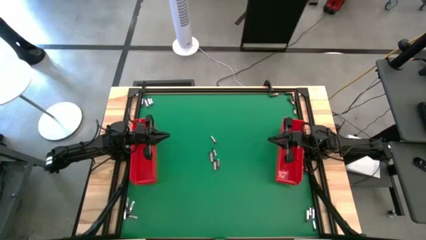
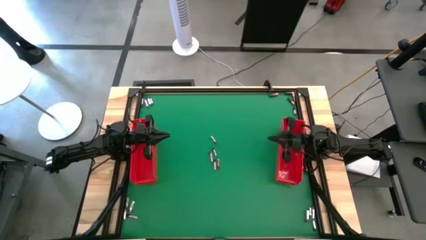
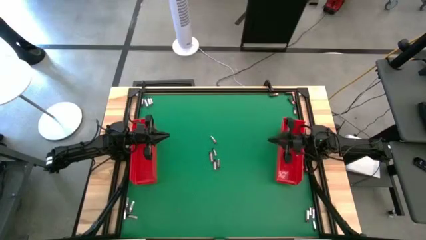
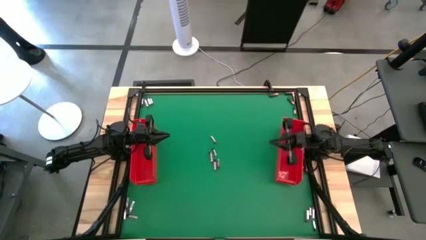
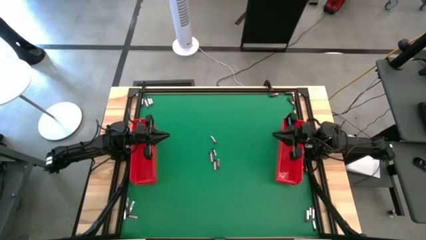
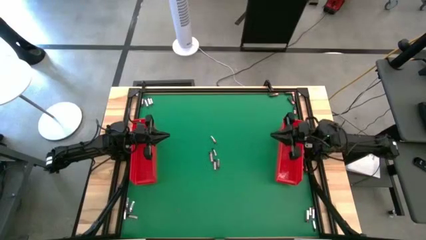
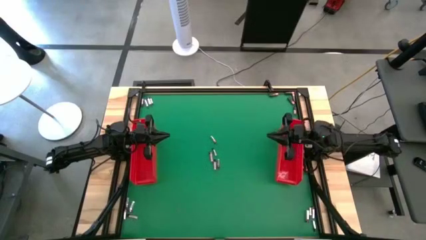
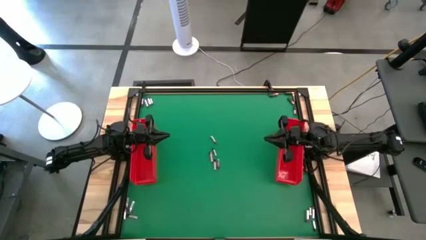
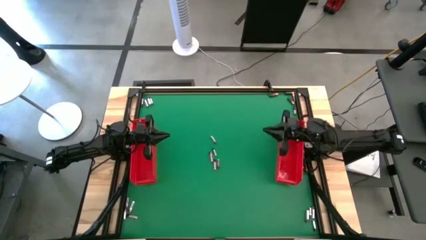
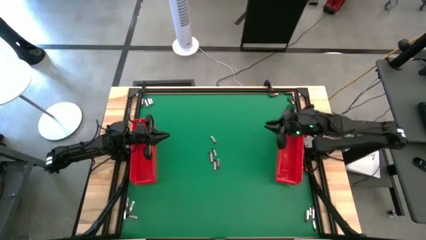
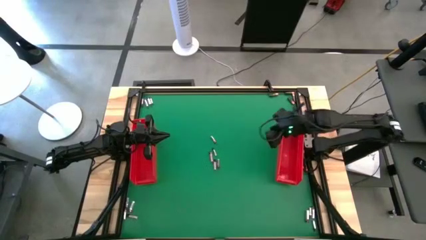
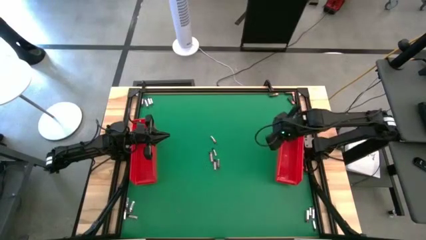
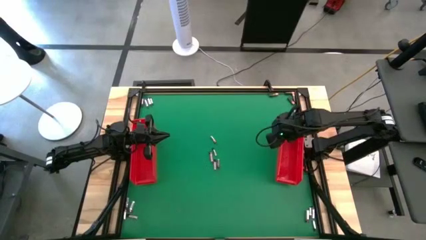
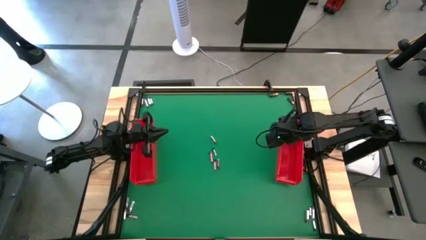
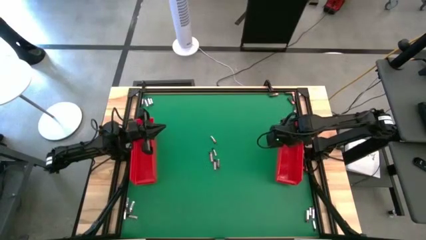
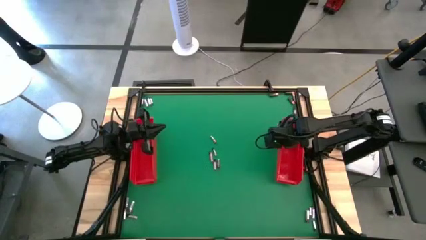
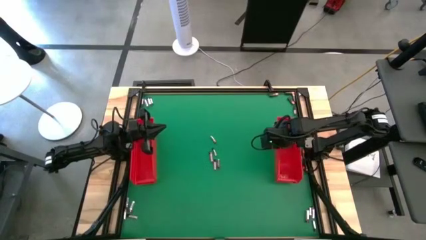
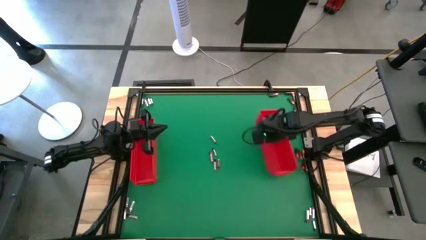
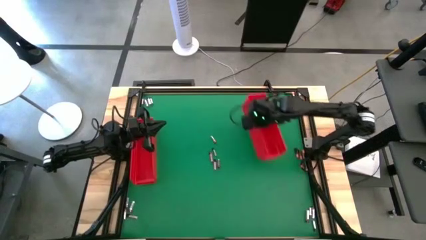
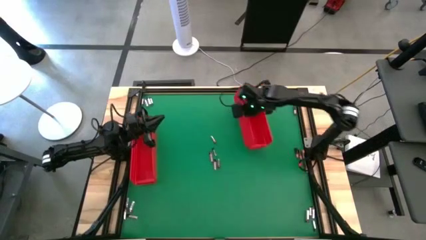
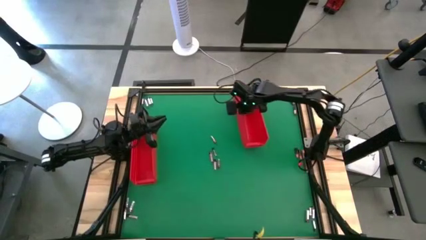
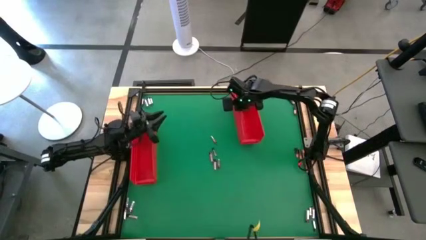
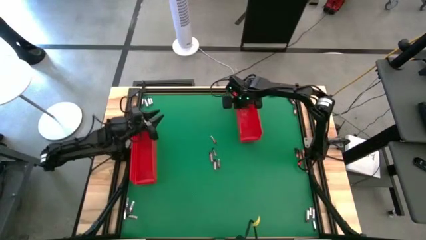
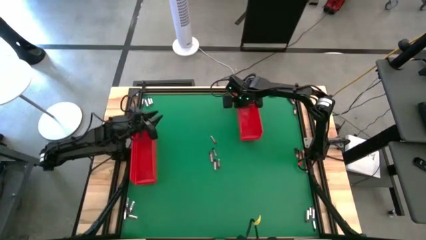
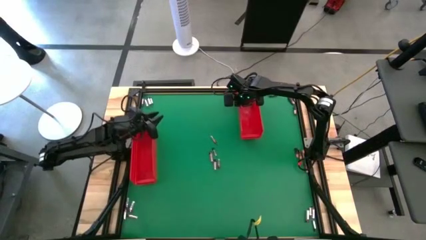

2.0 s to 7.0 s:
Task: Sort batteries
Move the right red bin to the top right of the table

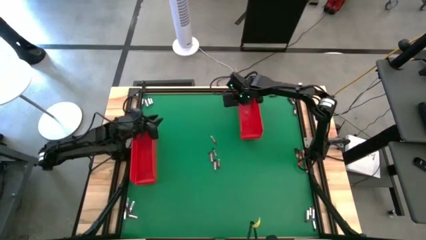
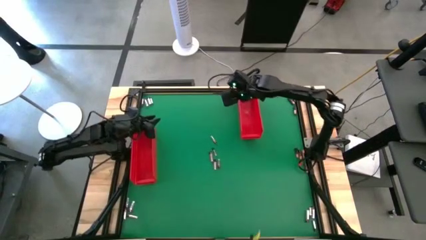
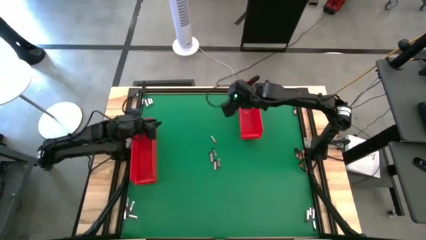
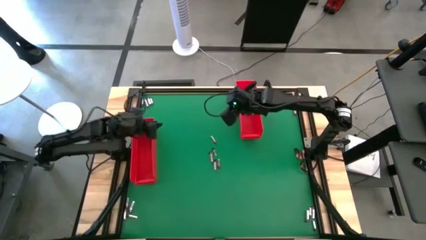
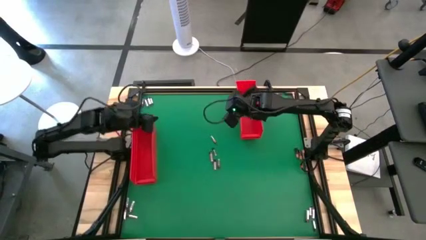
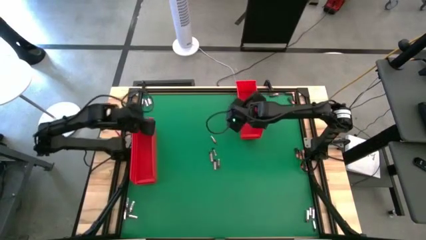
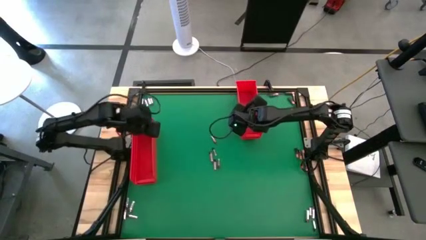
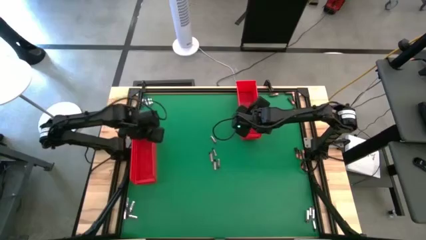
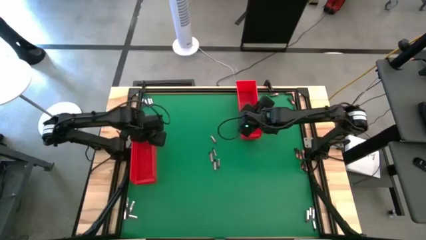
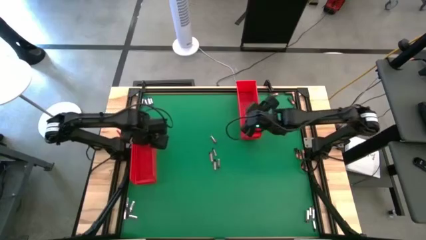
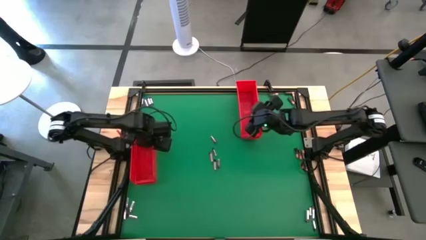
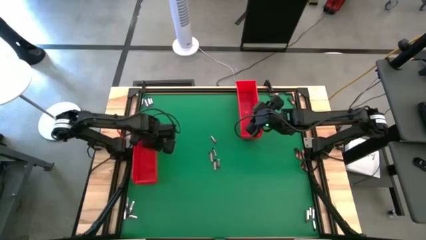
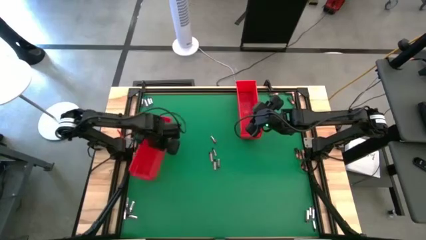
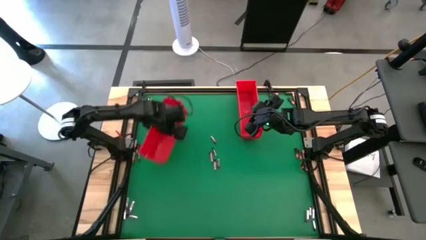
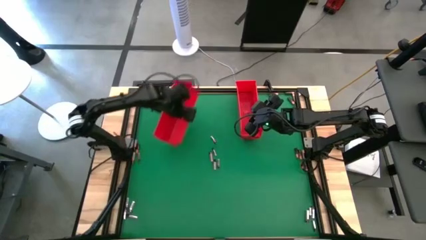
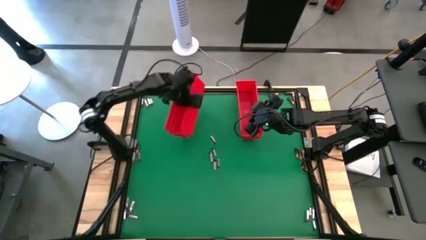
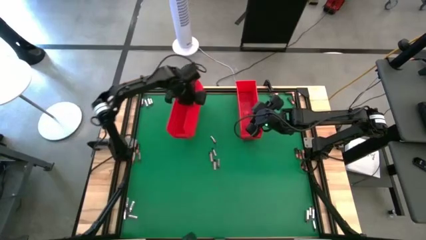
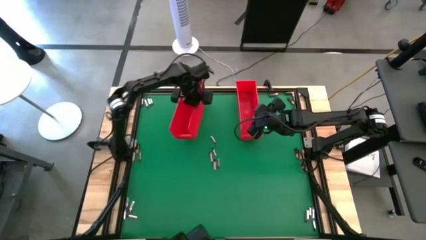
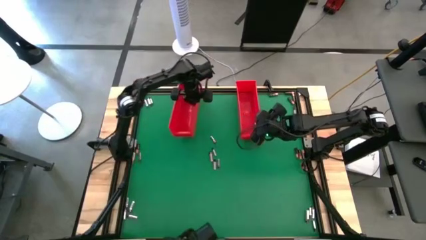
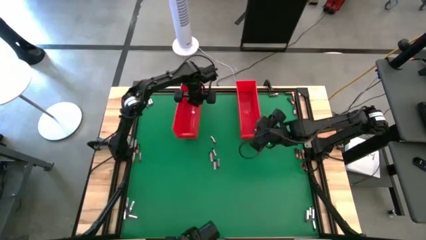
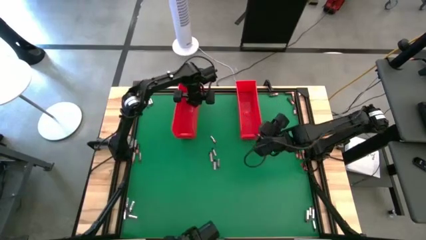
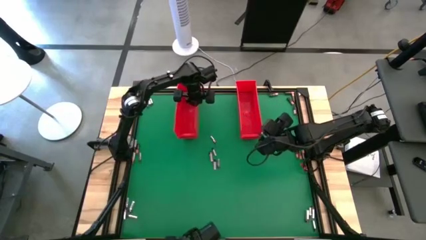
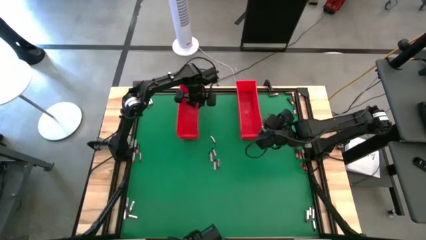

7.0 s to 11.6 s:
Move the left red bin into the top left of the table

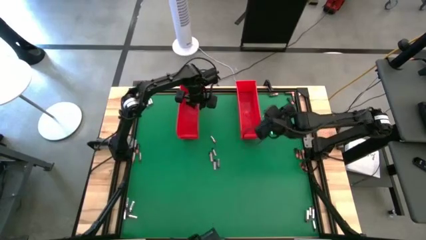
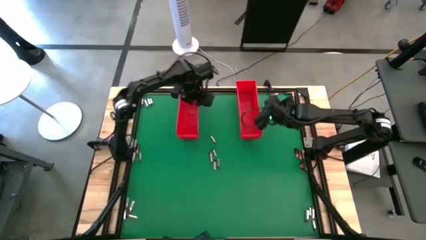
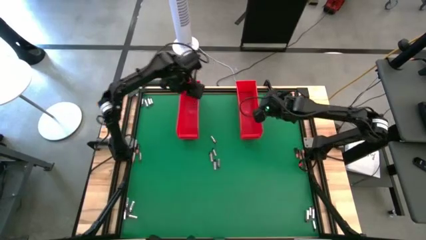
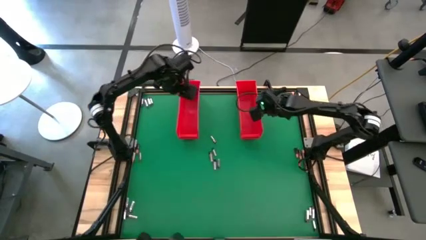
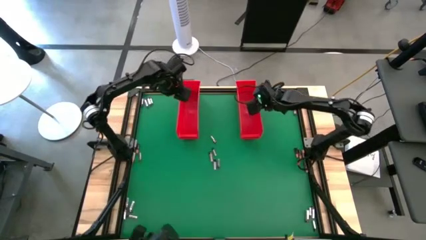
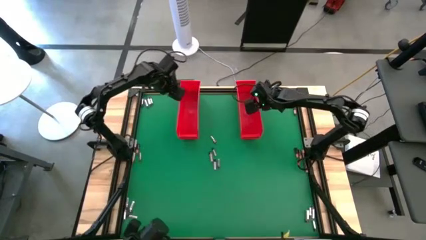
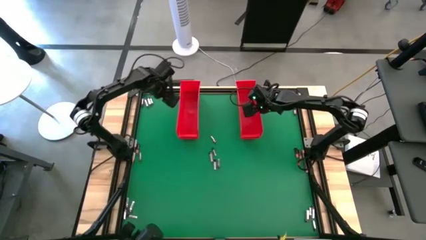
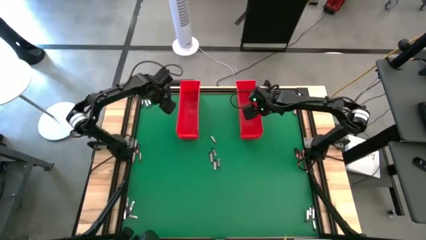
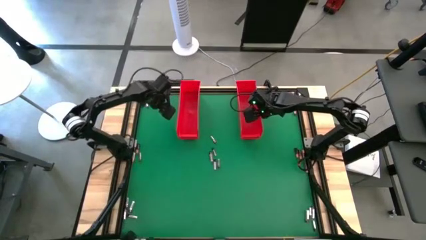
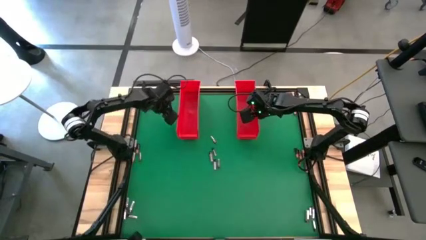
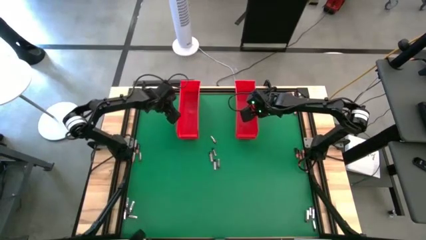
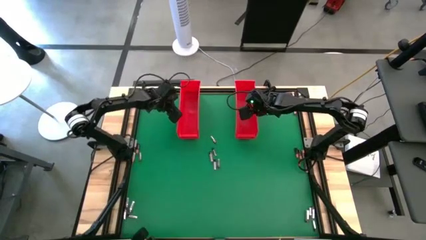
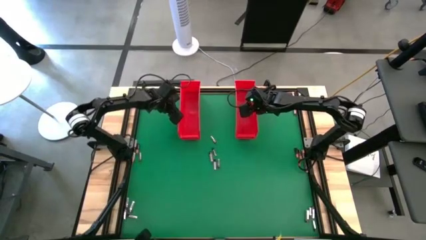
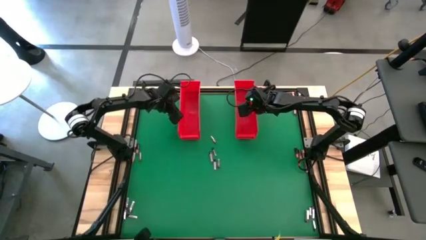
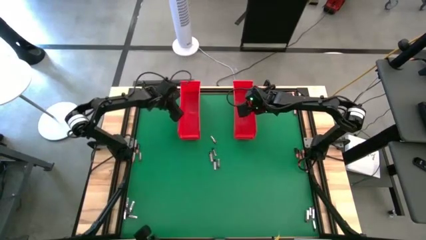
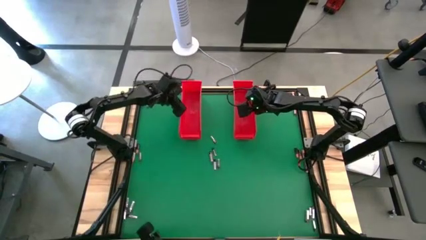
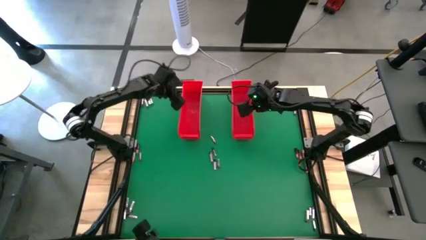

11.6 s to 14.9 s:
Adjust the red bins

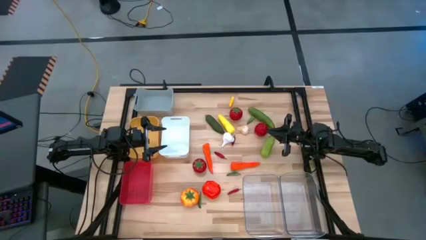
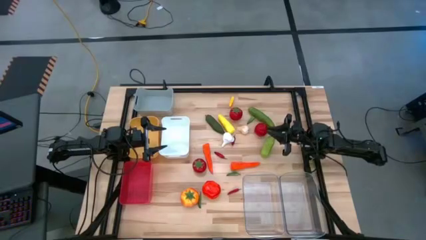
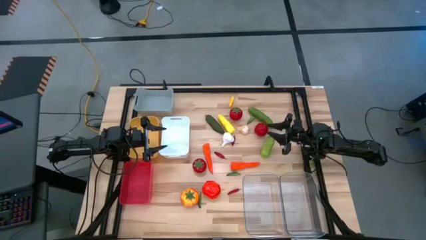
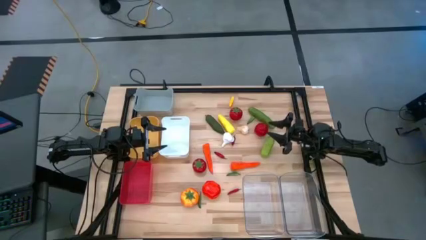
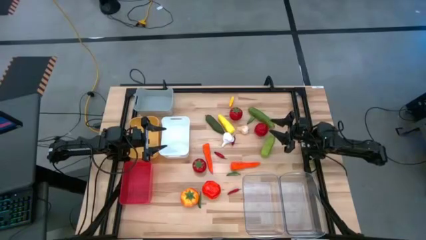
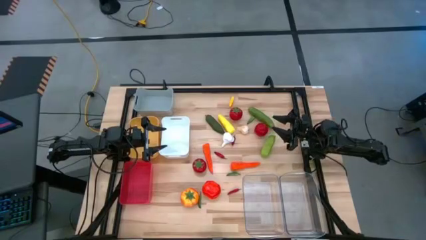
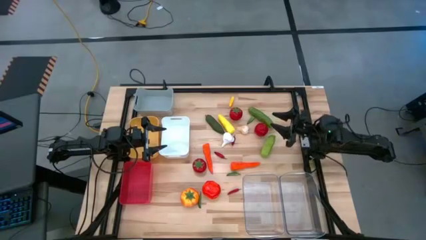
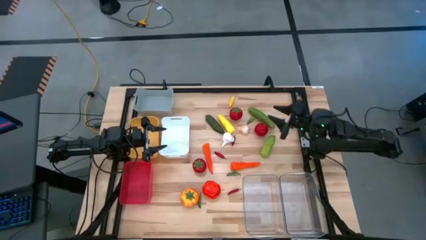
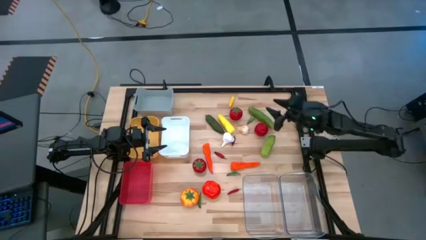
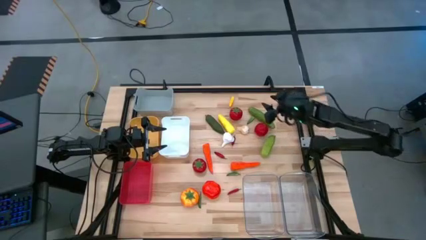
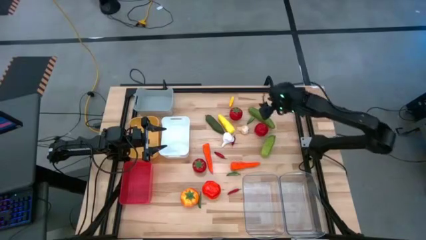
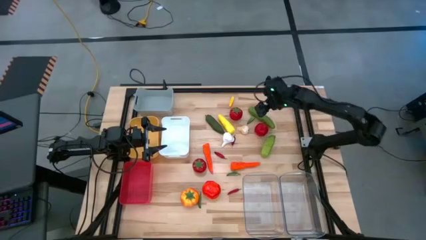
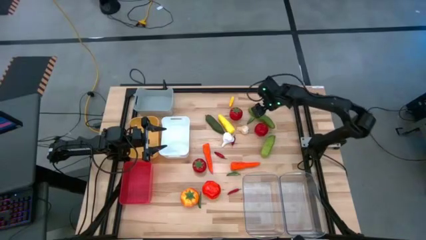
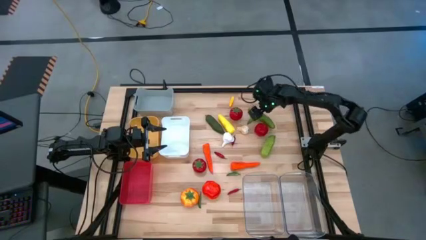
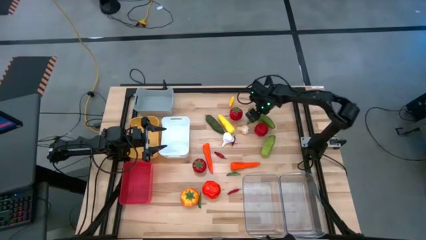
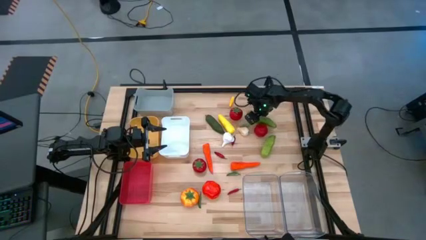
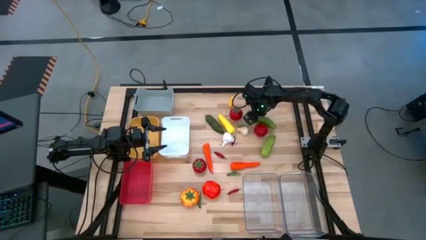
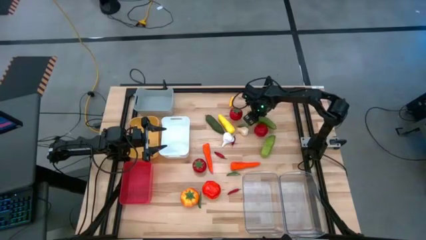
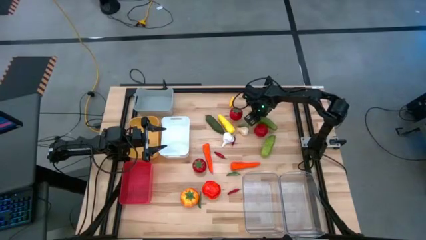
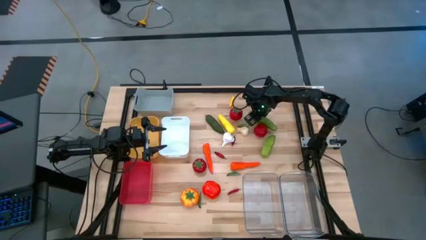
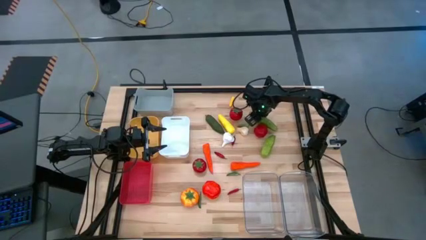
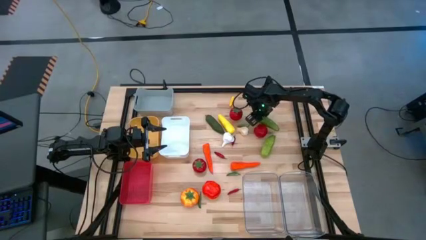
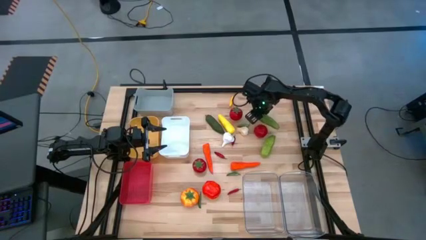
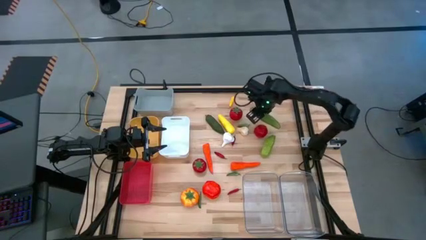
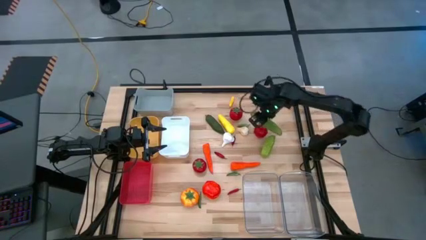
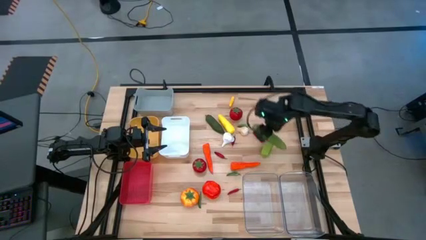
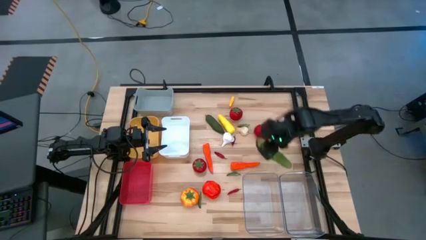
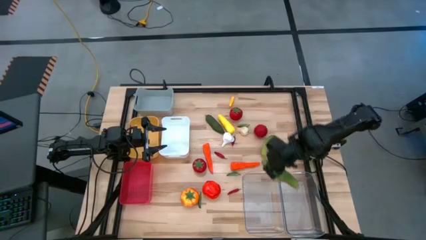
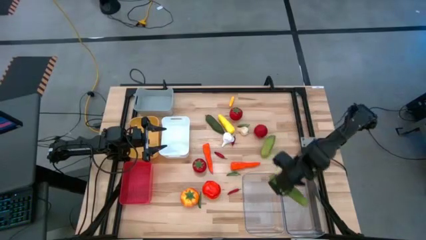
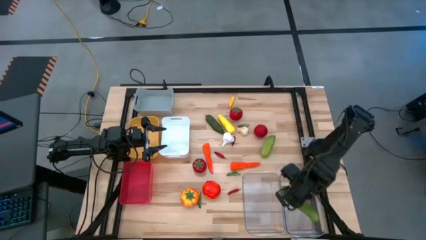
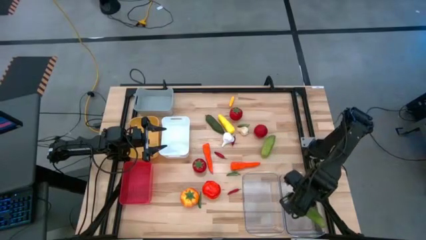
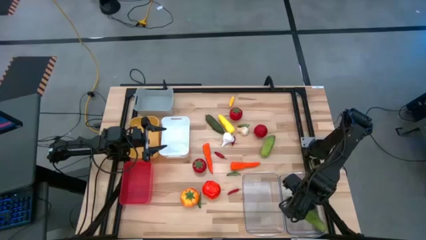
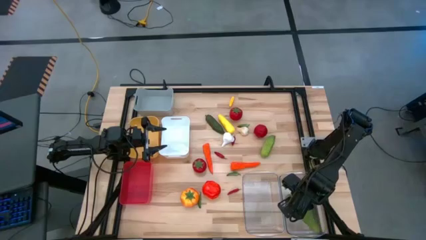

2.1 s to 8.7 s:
Task: Sort produce into baskets
Put the top green cucumber into the right transparent bin
